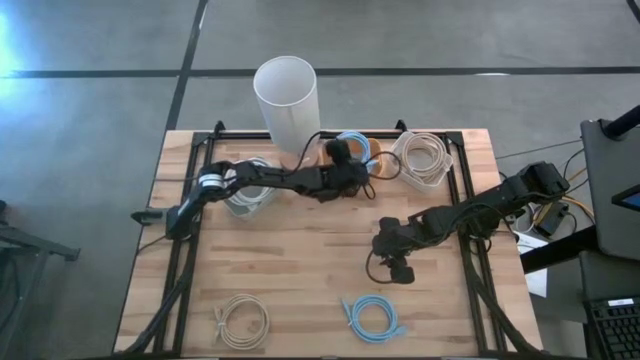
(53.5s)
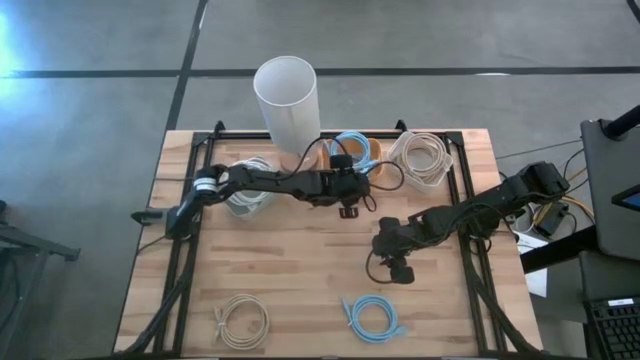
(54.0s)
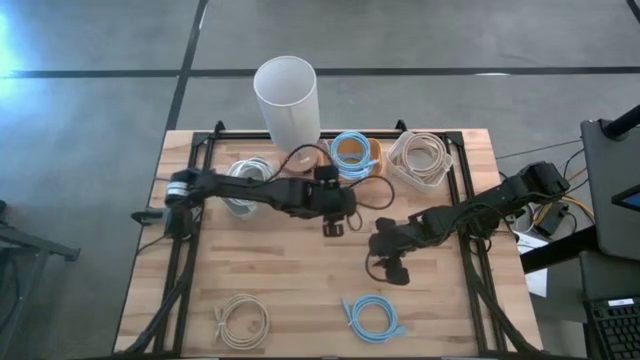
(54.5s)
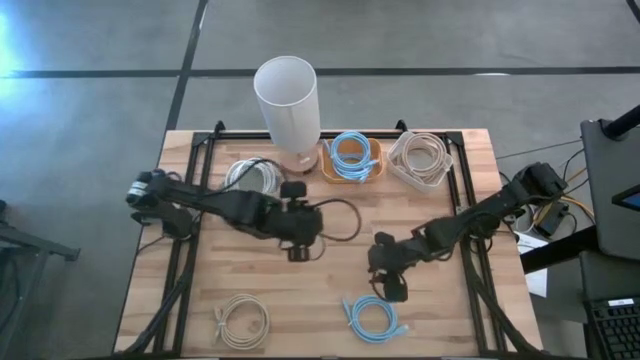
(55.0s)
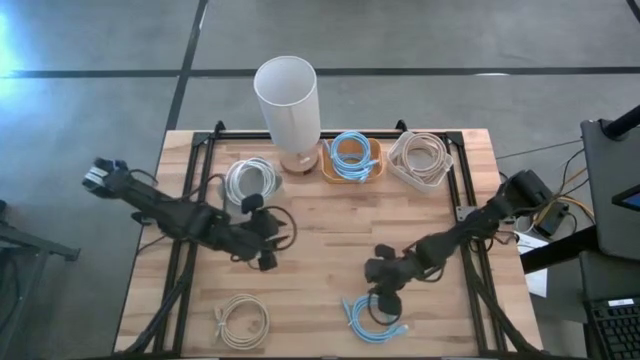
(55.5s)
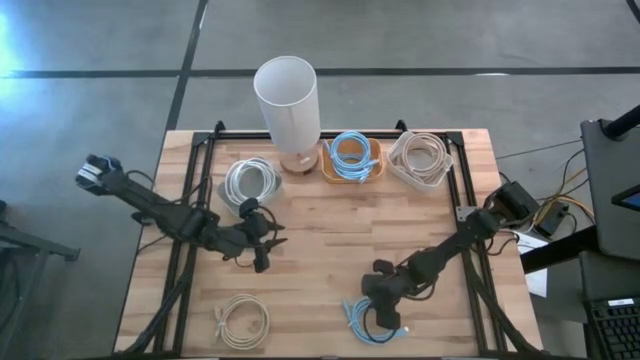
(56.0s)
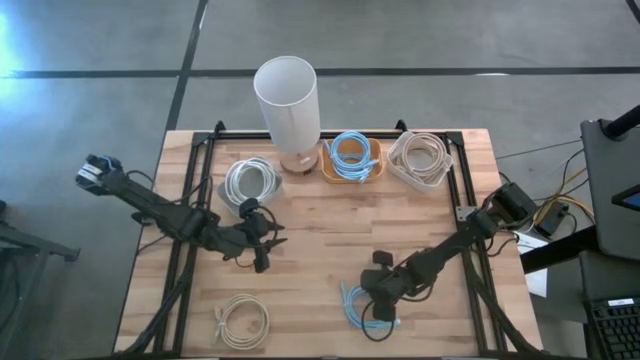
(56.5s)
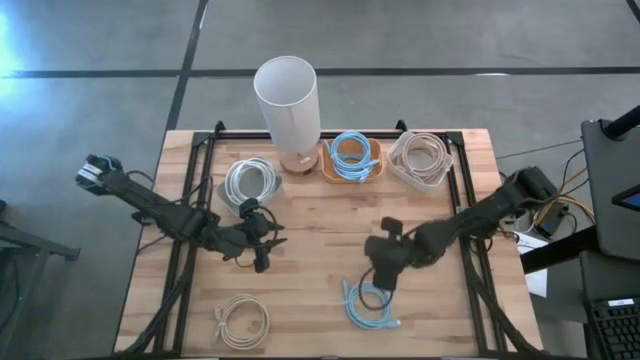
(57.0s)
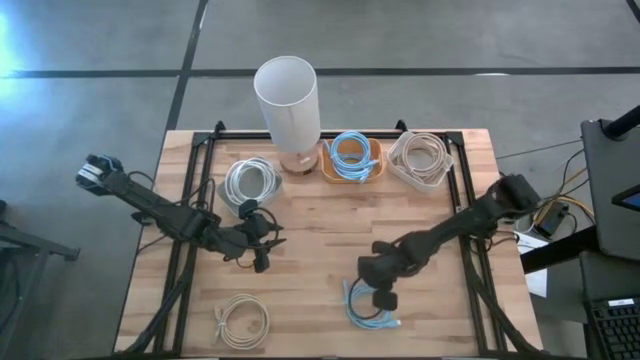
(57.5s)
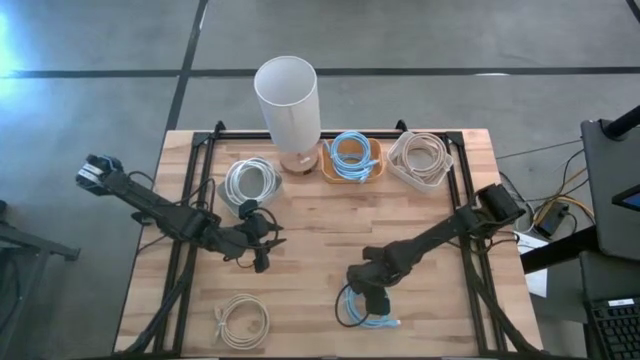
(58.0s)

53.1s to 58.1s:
Task: Sort HDMI cables
Put the blue HDMI into the yellow bin

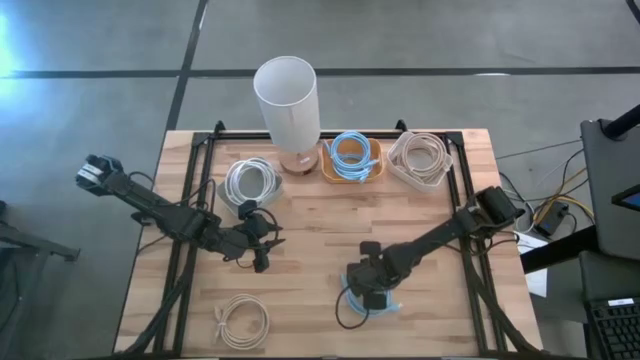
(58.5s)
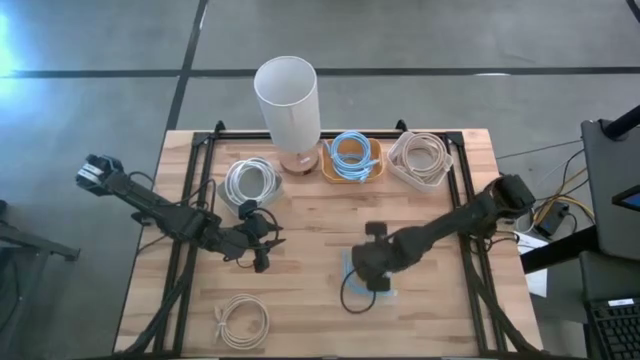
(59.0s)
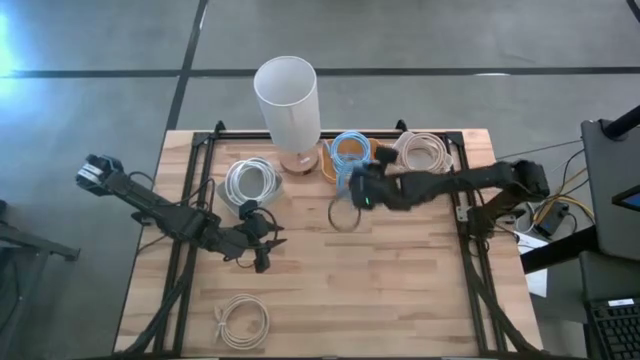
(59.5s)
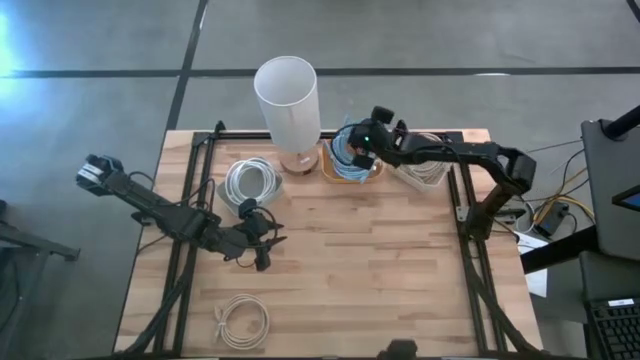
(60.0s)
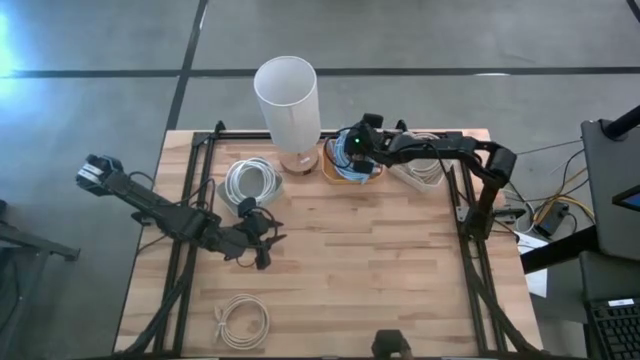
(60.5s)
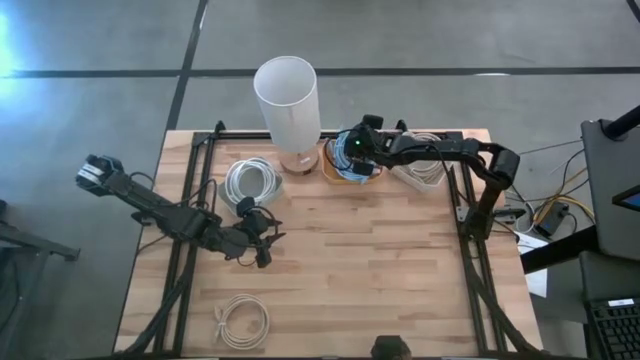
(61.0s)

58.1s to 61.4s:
Put the blue HDMI into the yellow bin

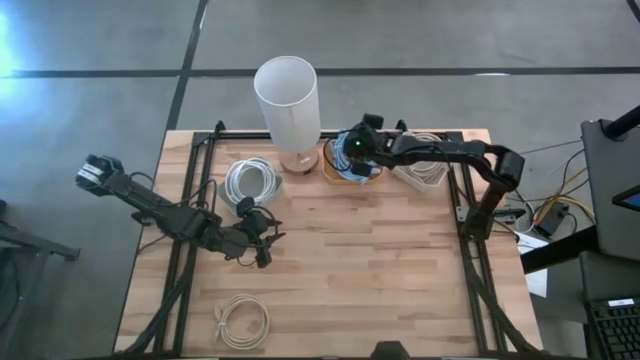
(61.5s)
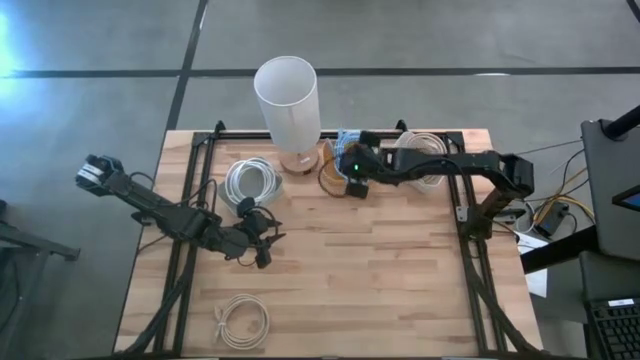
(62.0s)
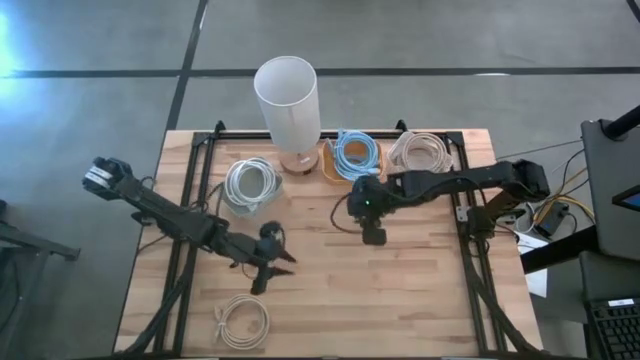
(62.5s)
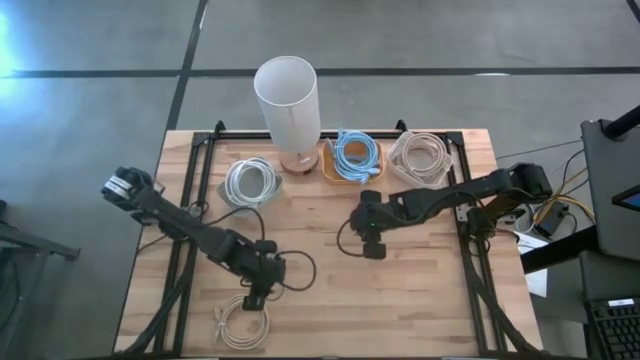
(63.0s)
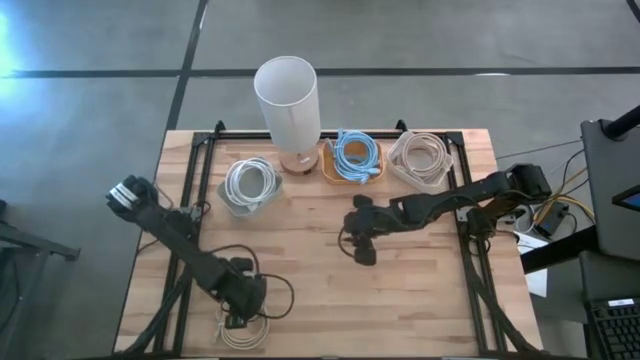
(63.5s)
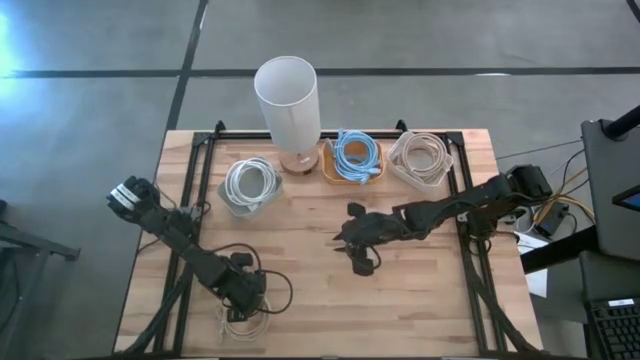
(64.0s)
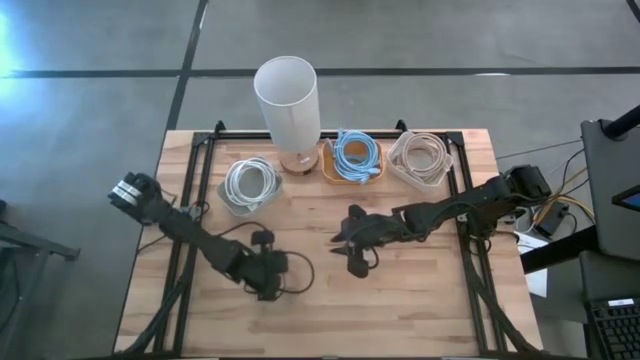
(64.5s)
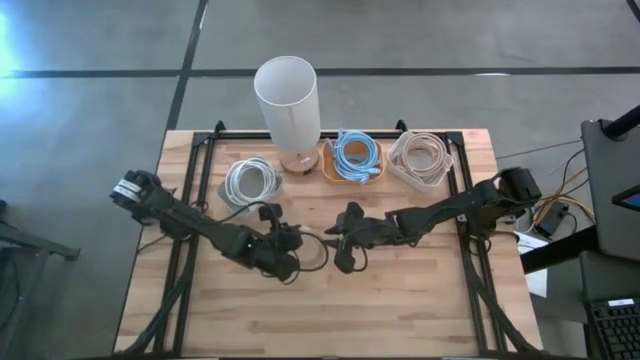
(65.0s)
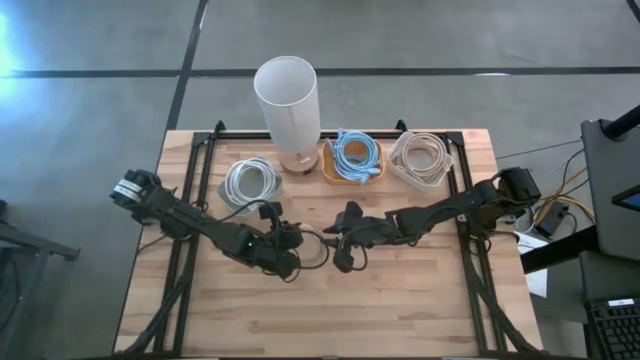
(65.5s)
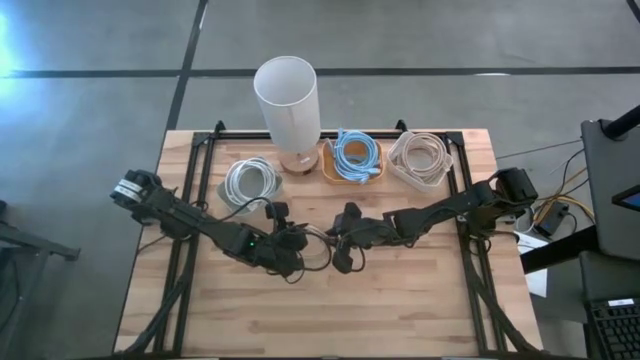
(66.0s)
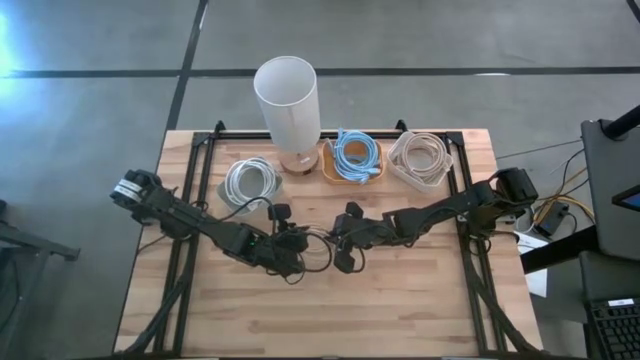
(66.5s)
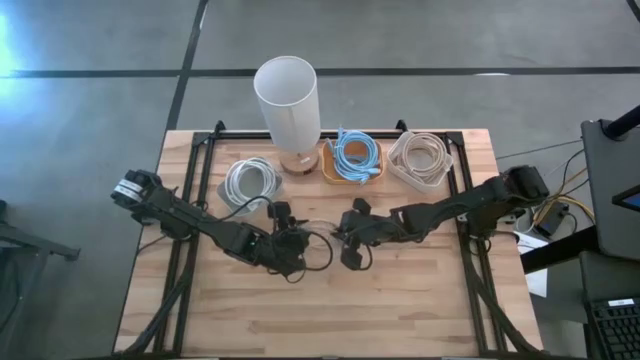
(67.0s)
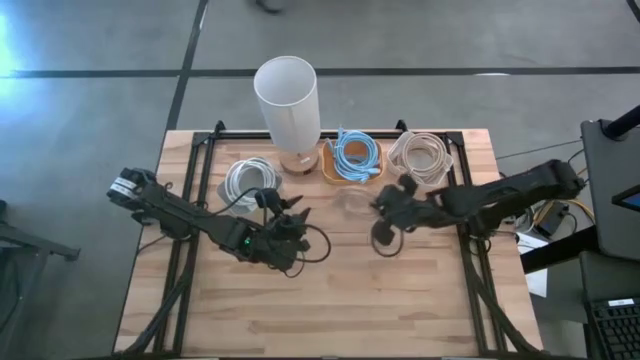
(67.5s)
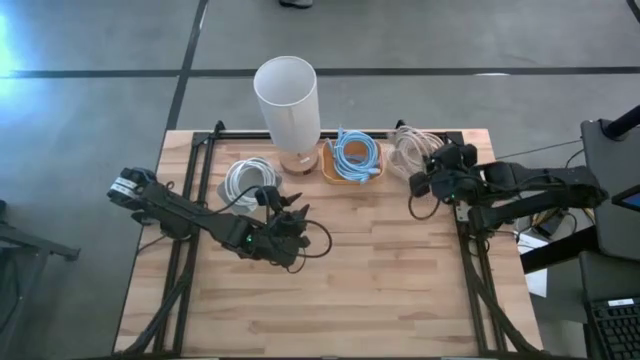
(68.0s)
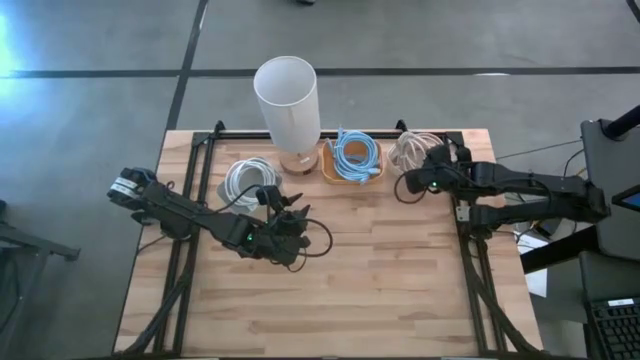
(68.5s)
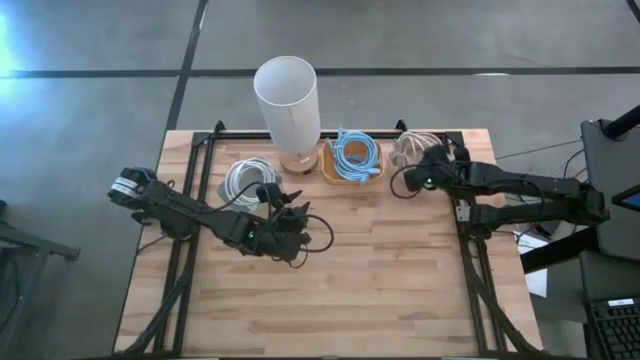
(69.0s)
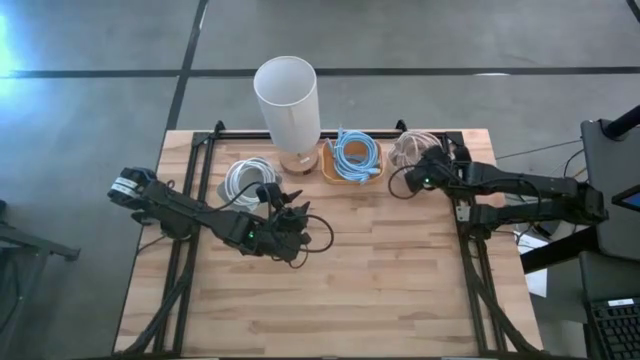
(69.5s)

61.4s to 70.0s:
Put the brown HDMI cable into the white bin

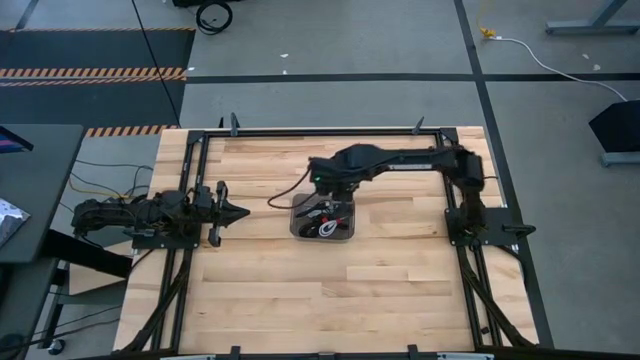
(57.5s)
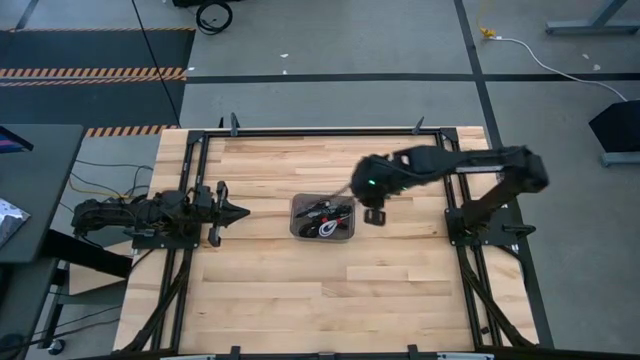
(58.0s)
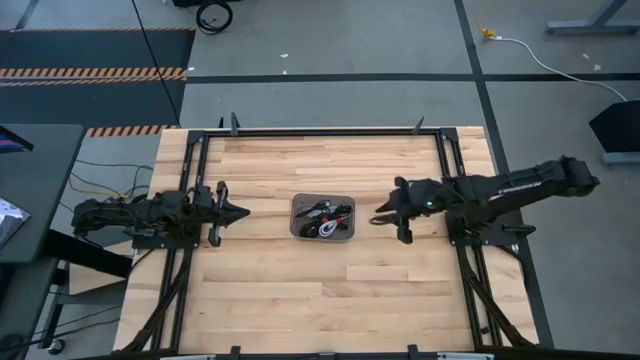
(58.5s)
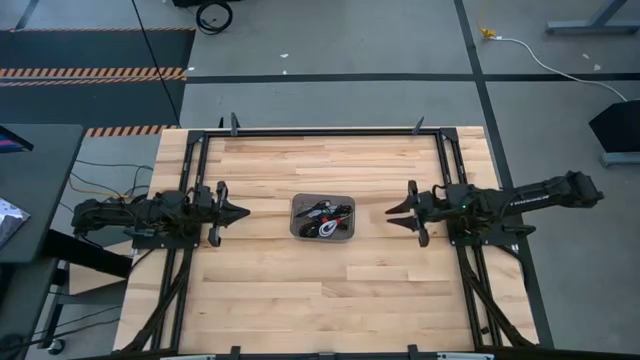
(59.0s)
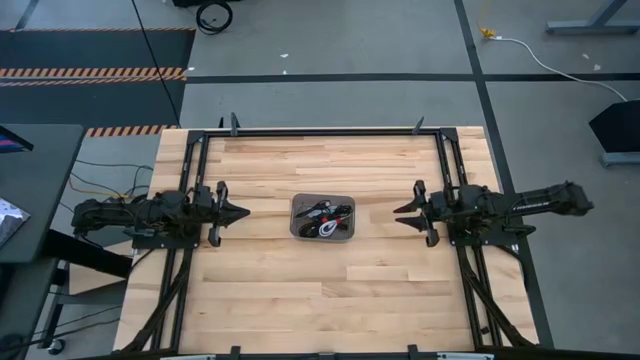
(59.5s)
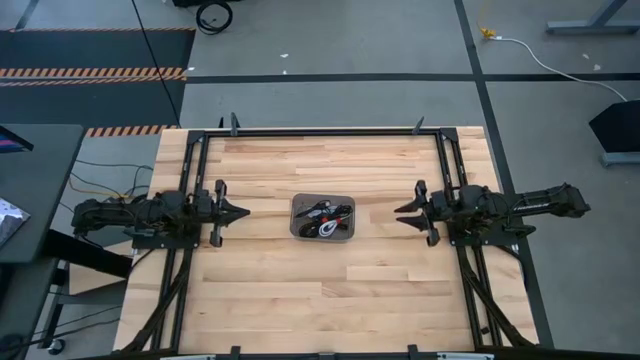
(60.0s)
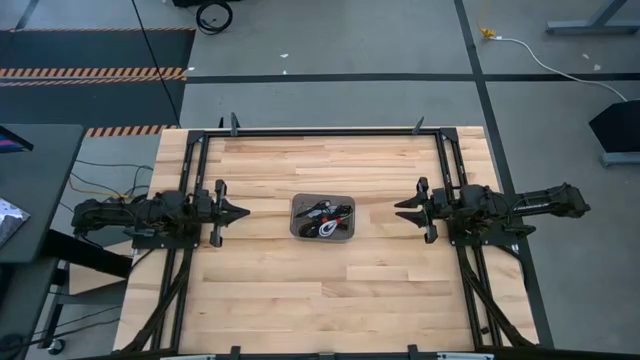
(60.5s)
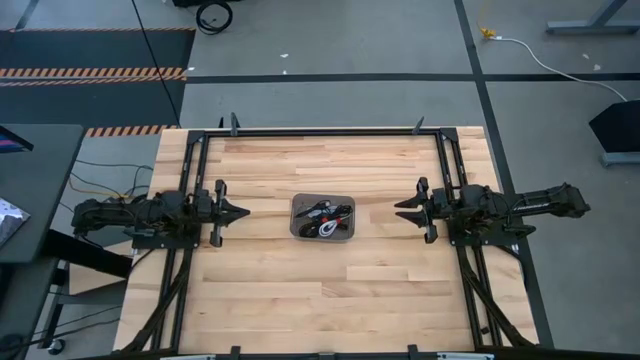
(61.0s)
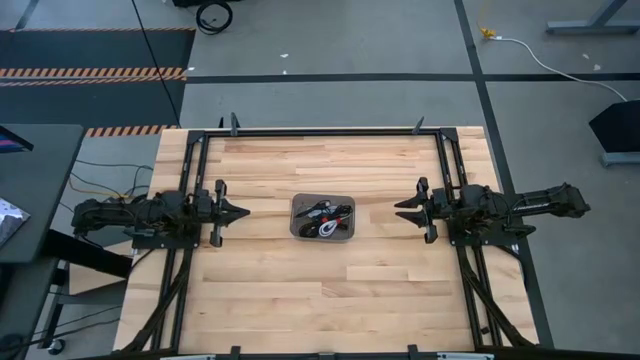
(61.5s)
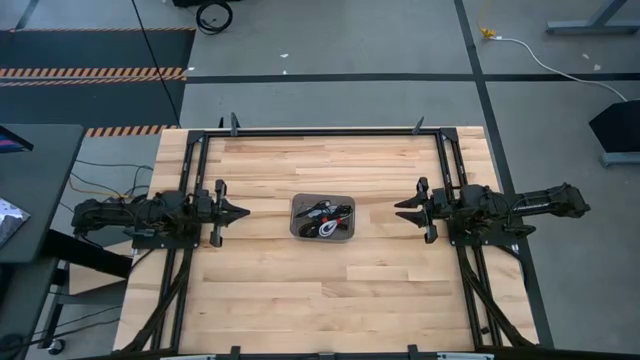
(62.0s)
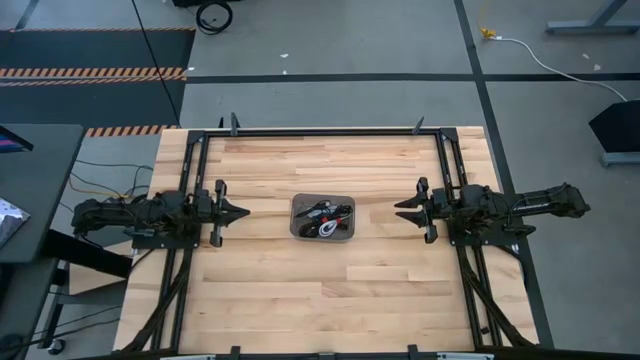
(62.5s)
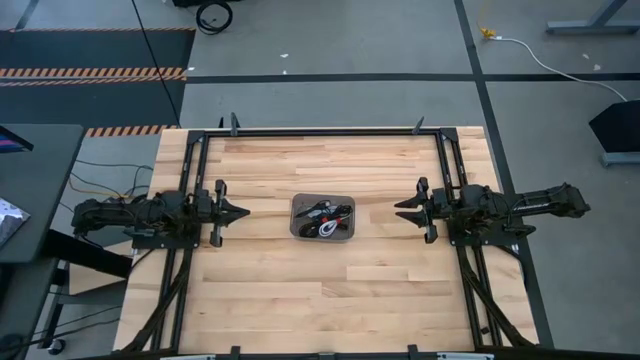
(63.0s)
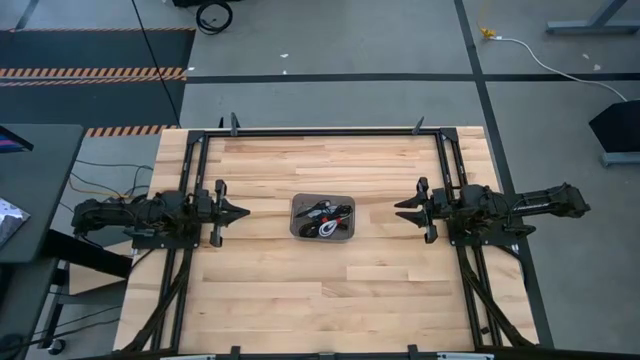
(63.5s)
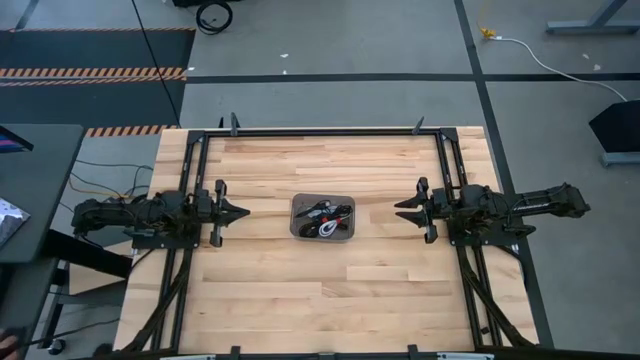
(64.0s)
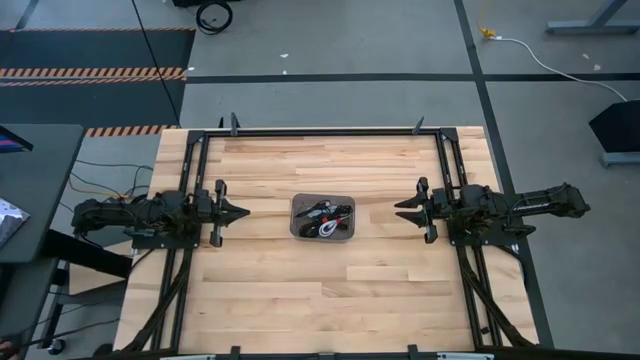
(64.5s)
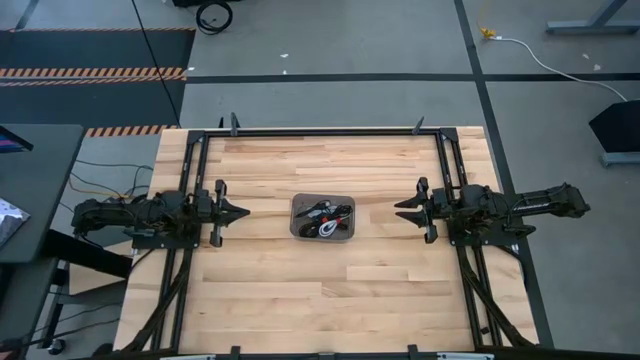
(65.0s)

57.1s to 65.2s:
Task: Pick and place USB-C Cables
Return to Home Position
